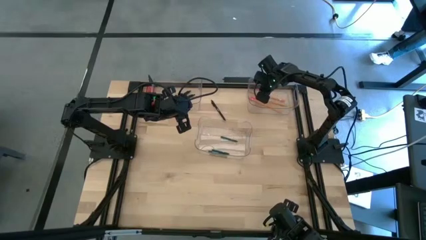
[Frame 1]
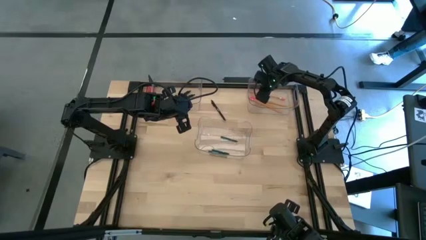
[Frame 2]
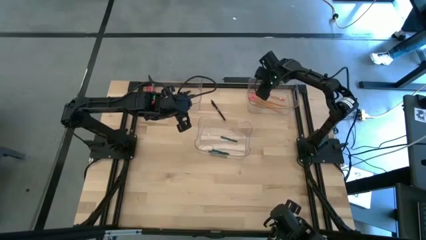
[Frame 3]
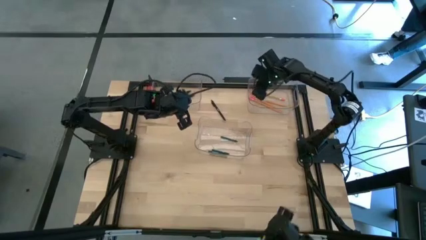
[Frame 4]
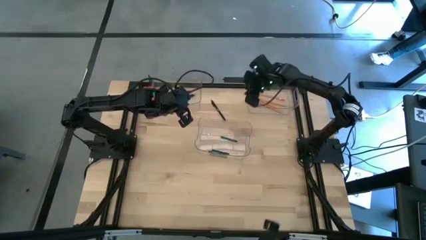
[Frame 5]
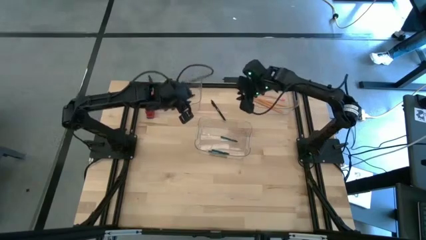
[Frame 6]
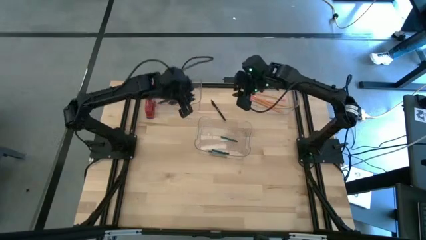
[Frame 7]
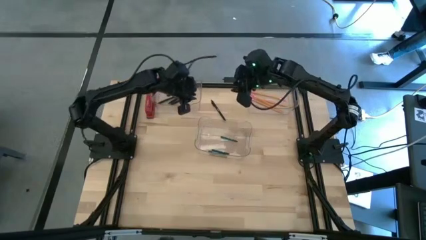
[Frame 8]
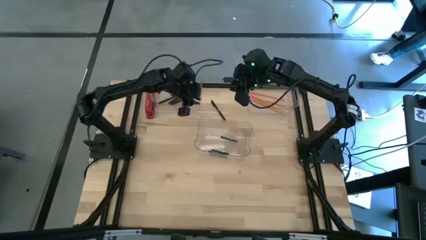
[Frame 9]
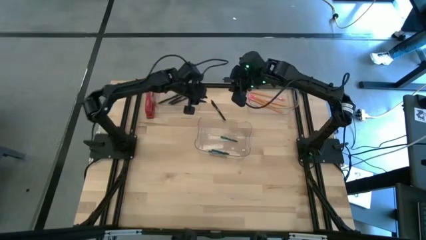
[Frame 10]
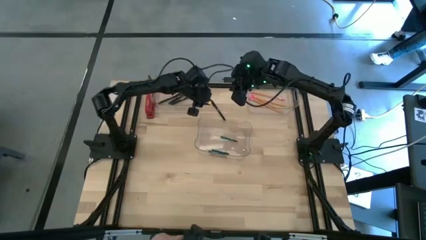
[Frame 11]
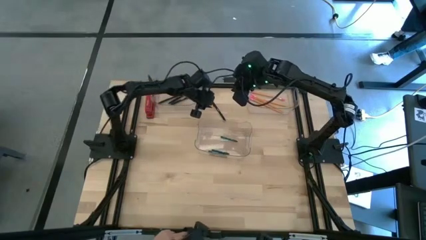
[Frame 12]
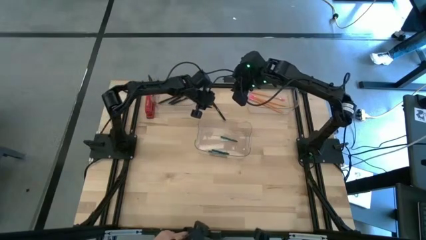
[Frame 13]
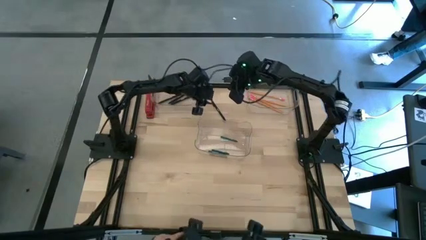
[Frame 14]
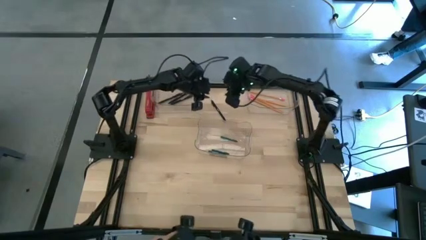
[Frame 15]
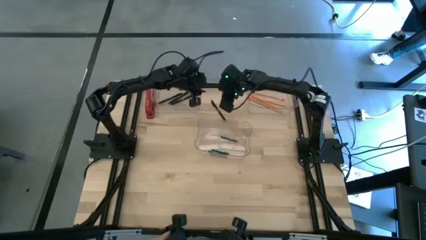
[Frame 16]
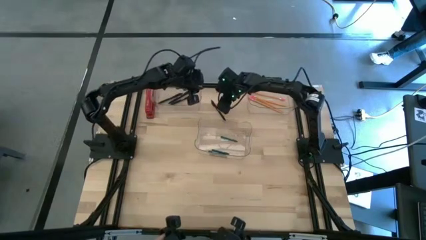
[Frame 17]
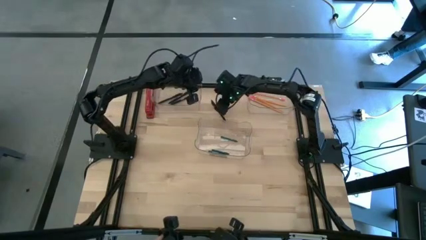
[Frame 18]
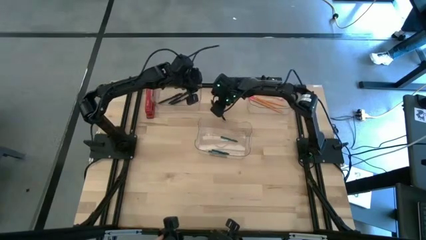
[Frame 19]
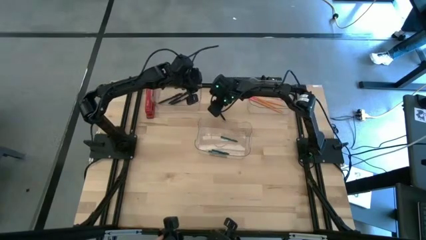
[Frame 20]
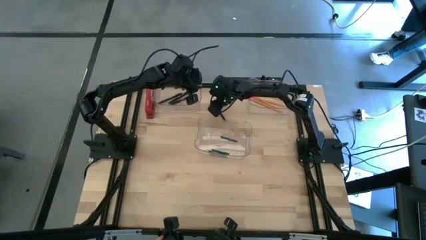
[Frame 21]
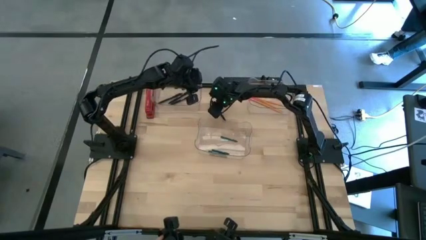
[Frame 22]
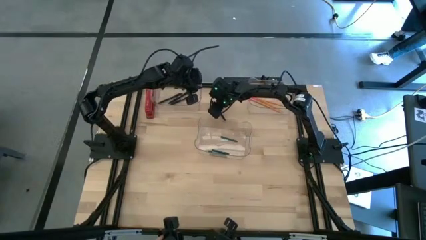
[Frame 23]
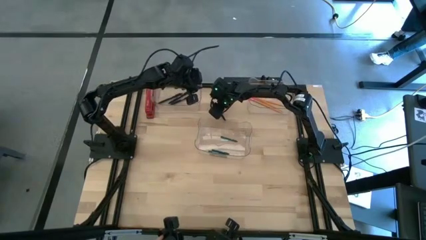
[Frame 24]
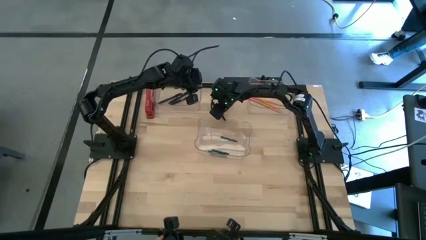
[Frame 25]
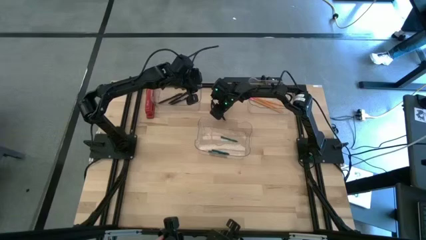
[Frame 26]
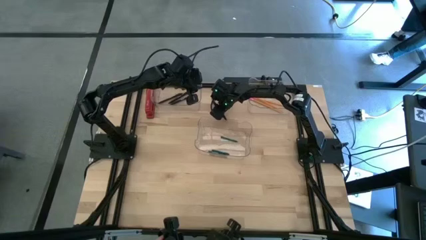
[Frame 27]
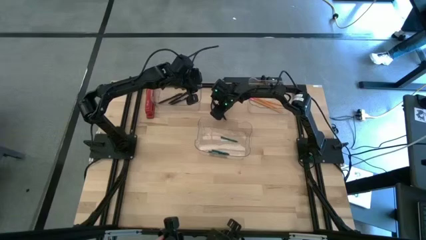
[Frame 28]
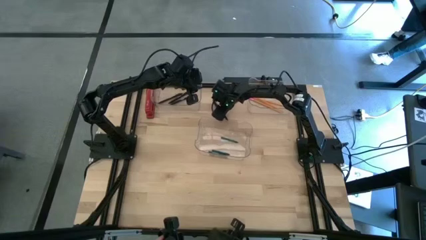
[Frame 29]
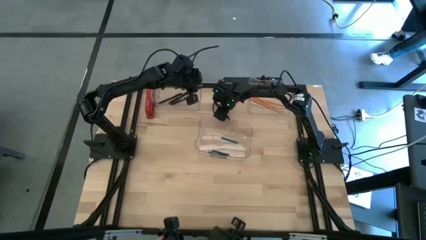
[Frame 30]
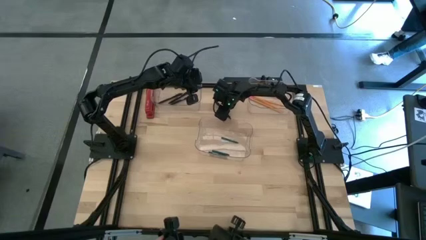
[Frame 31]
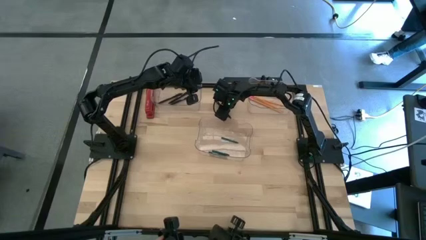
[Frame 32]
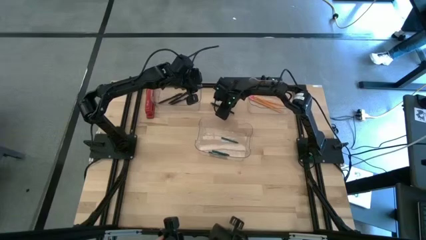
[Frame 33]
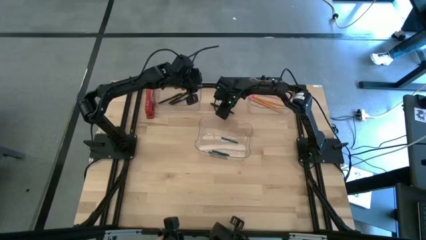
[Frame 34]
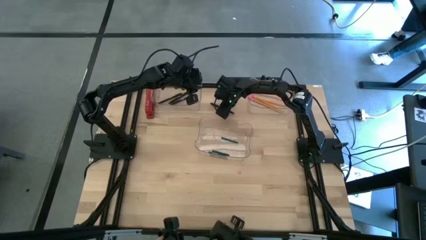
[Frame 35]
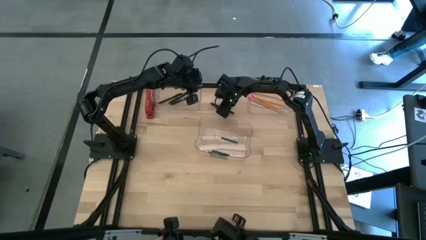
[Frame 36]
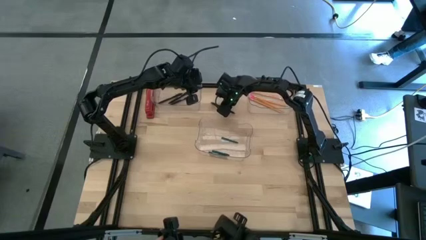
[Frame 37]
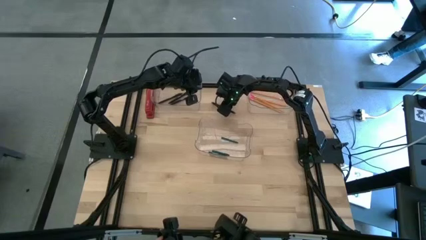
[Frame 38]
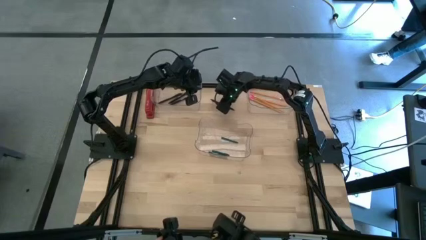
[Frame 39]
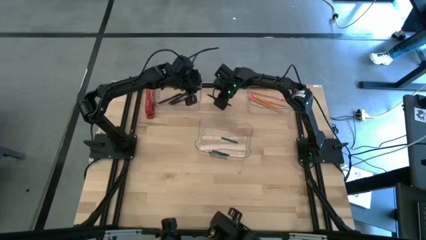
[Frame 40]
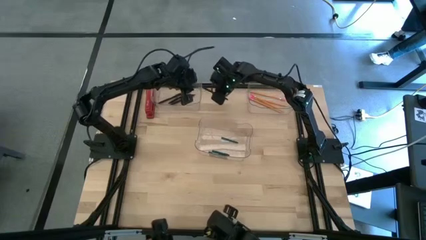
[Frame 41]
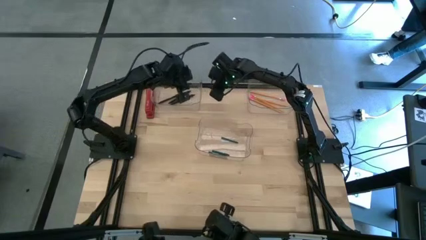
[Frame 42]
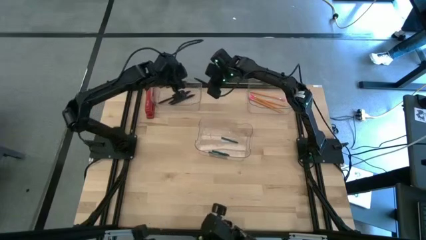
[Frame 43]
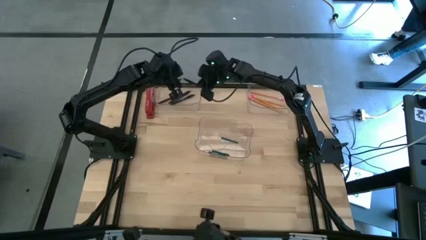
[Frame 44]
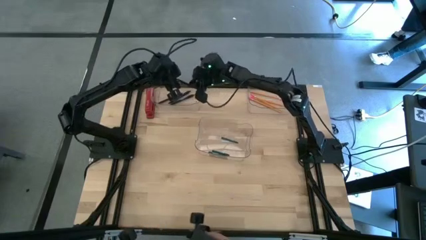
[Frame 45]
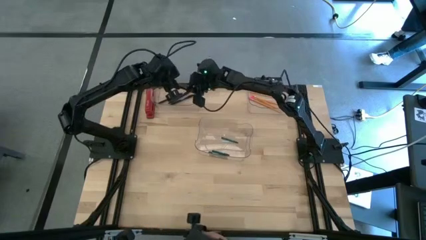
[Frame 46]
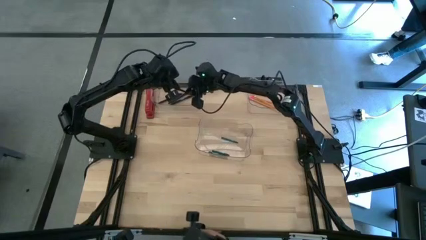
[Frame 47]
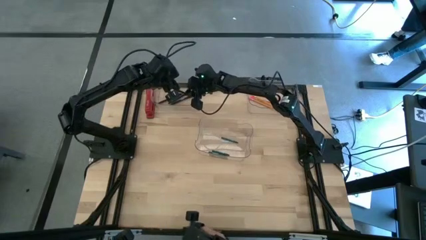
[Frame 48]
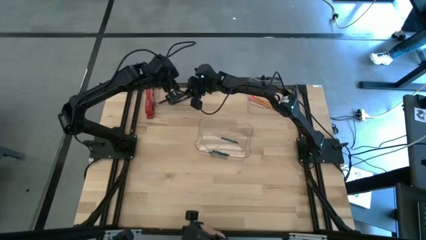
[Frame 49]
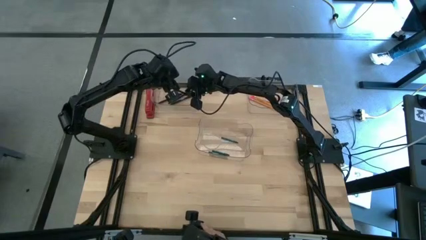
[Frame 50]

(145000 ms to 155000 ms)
Task: Sort crayons/erasers/pens/pencils in bins
Put the black pen into the top left transparent bin

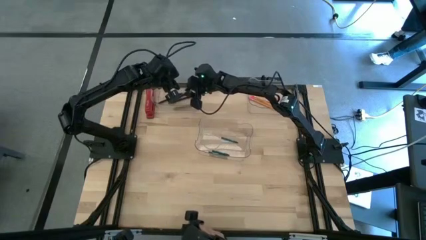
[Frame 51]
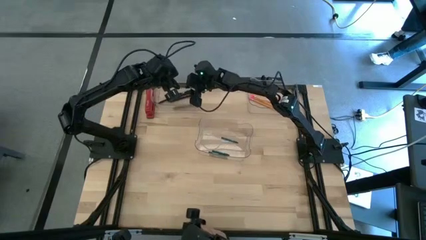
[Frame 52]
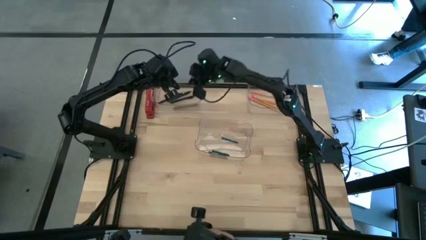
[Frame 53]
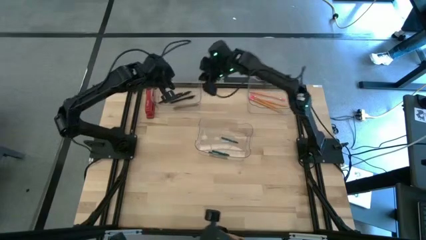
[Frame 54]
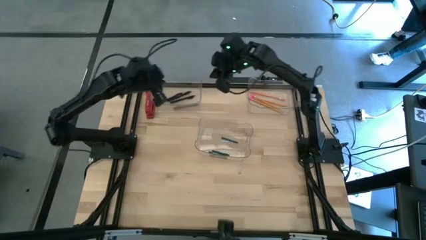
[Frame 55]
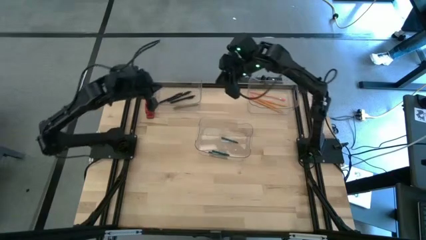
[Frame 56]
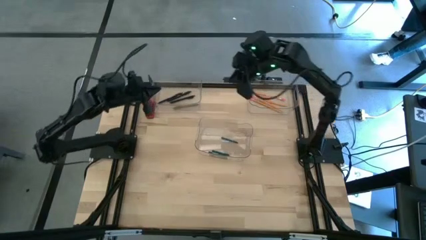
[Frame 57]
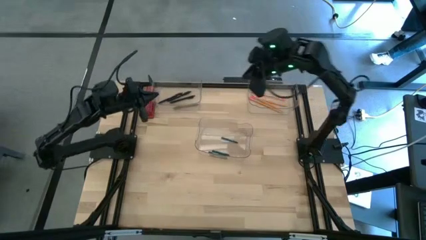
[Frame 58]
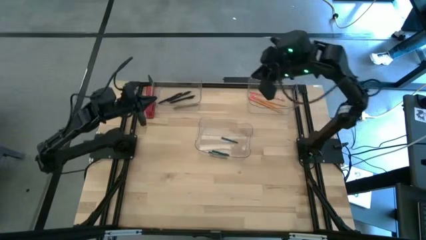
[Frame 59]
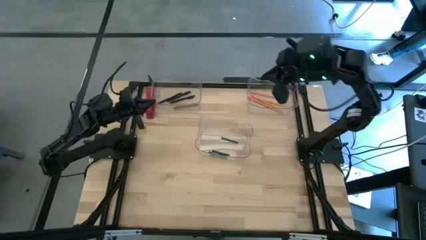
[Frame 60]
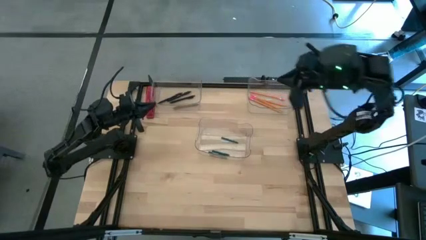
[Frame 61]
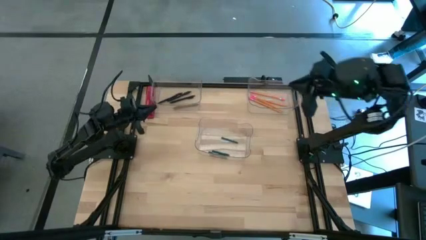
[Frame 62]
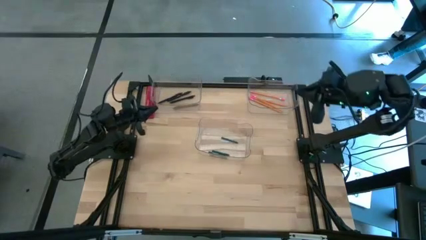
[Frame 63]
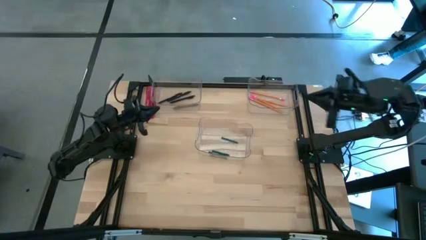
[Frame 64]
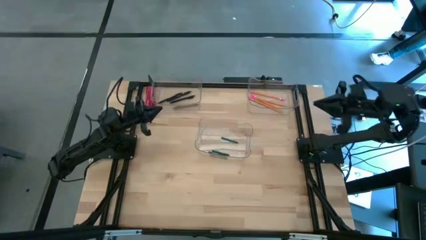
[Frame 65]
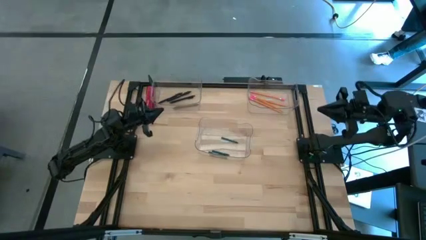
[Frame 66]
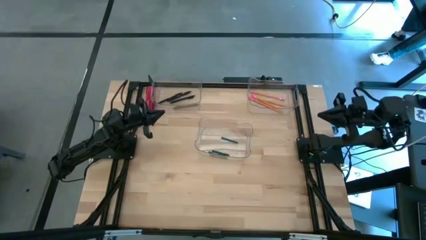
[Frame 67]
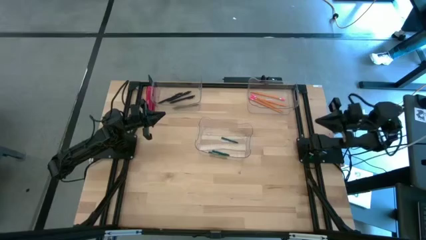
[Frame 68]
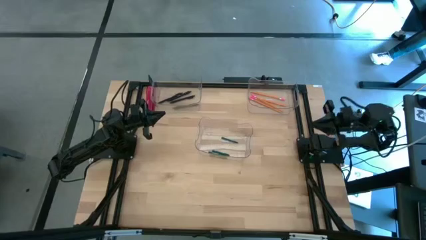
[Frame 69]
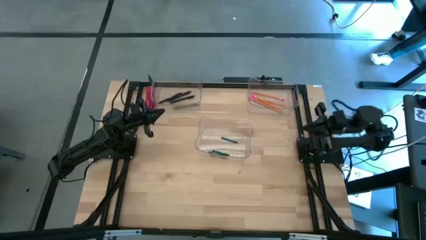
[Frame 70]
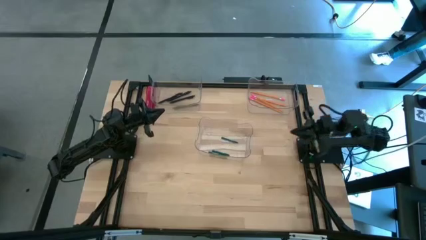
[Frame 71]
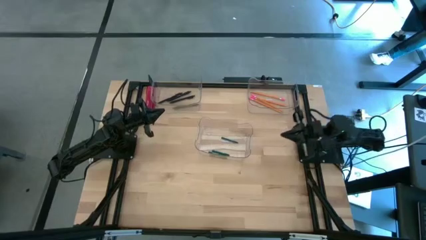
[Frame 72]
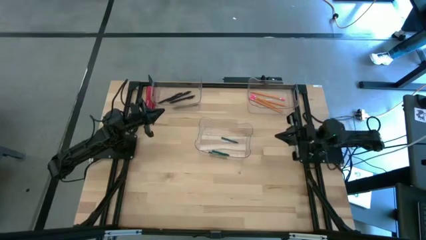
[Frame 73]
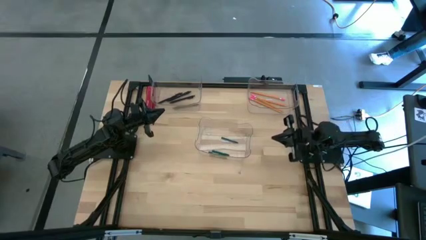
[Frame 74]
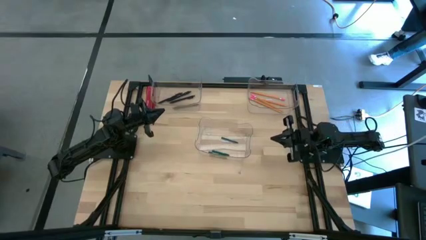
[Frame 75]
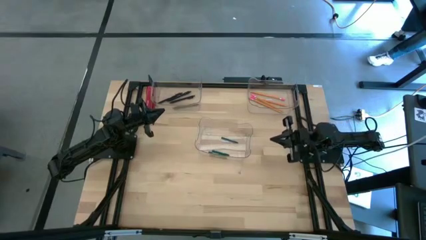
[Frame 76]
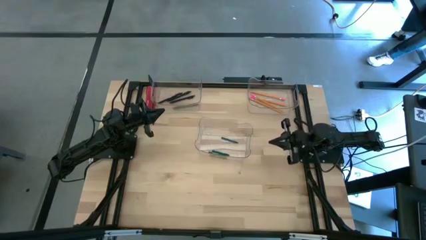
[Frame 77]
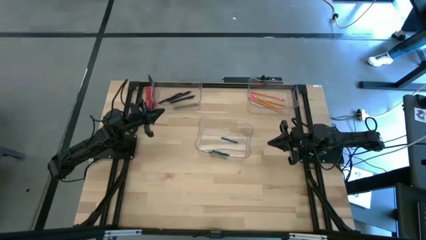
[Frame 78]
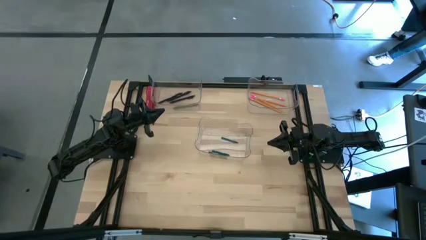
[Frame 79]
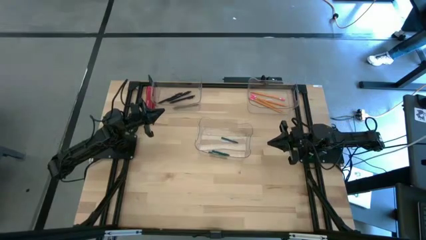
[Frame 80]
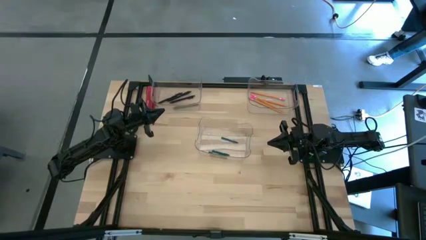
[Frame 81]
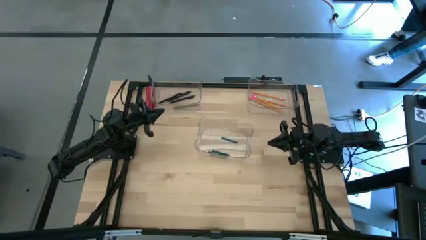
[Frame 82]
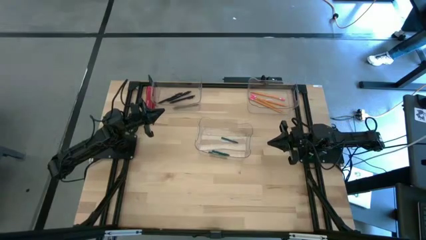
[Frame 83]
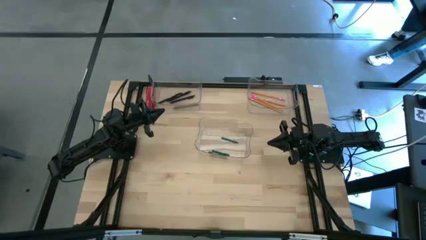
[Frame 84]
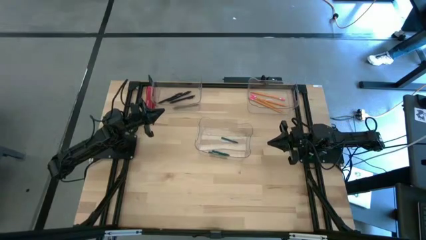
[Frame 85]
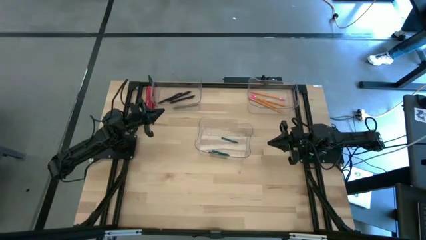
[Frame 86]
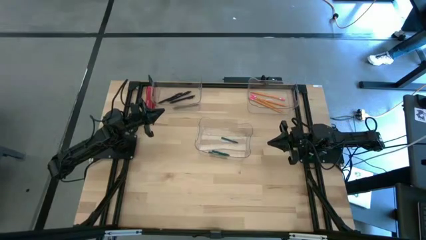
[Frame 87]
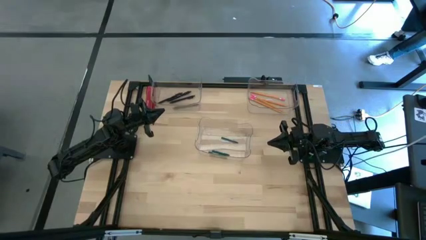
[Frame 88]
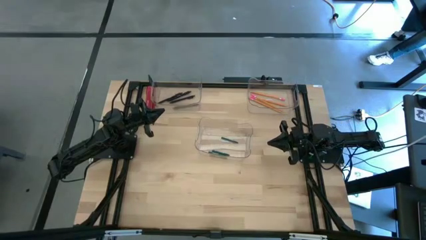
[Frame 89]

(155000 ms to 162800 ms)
Return to Home Position
